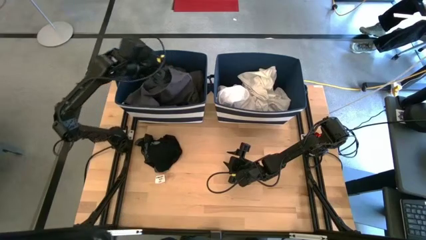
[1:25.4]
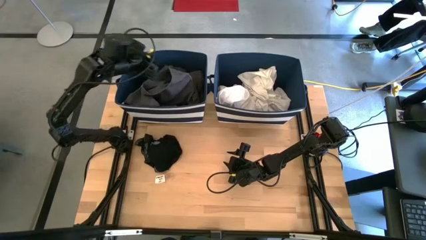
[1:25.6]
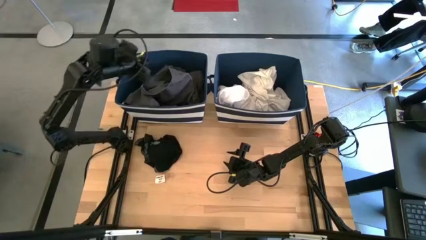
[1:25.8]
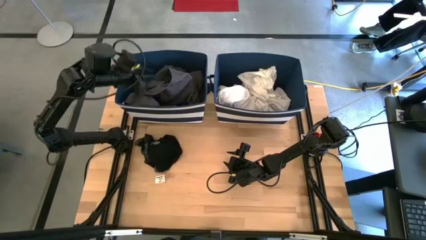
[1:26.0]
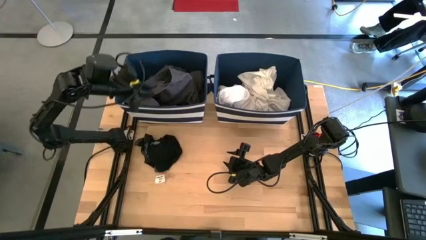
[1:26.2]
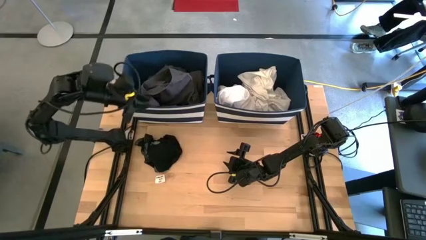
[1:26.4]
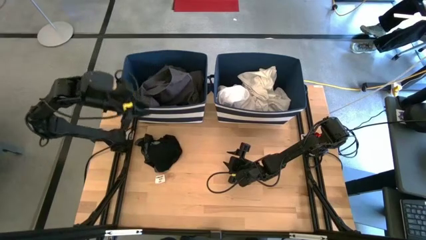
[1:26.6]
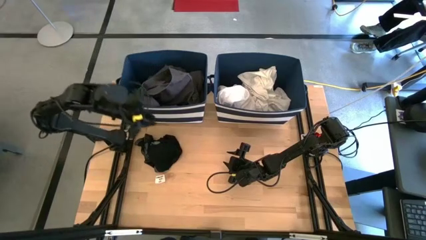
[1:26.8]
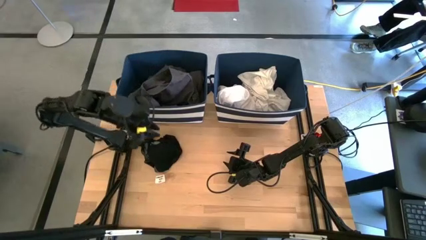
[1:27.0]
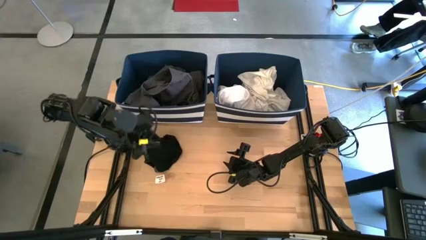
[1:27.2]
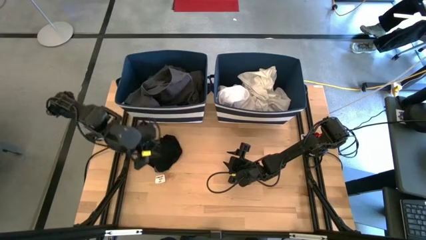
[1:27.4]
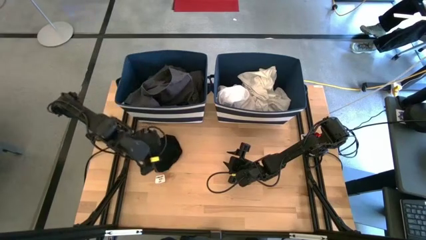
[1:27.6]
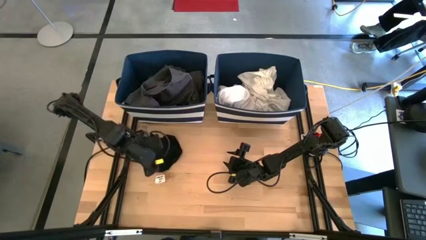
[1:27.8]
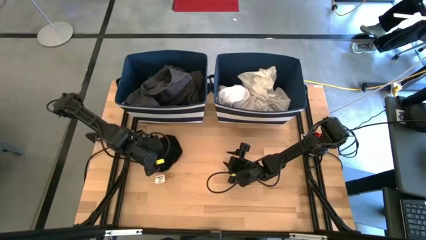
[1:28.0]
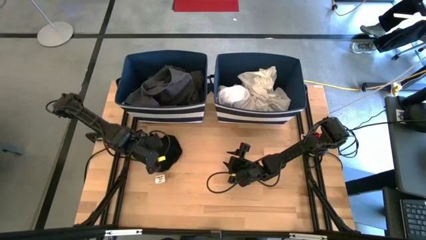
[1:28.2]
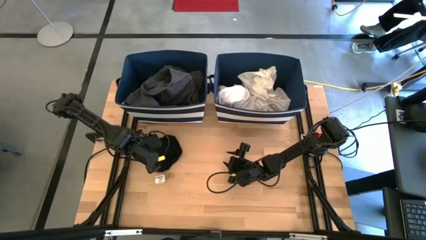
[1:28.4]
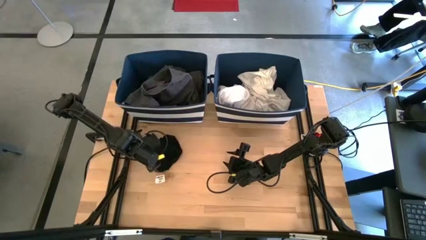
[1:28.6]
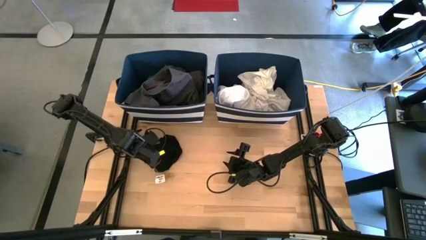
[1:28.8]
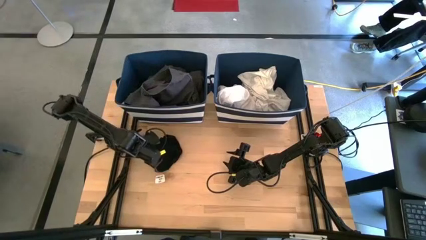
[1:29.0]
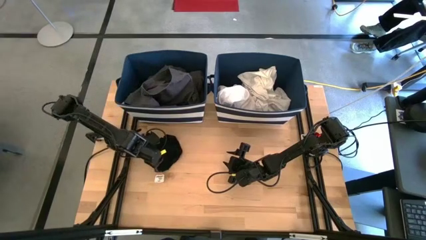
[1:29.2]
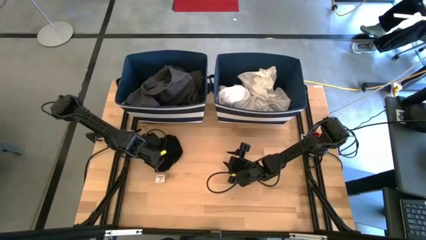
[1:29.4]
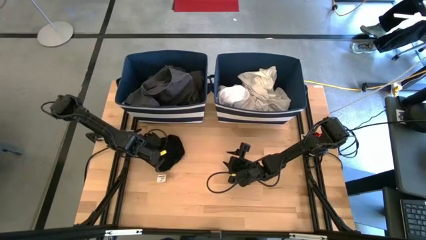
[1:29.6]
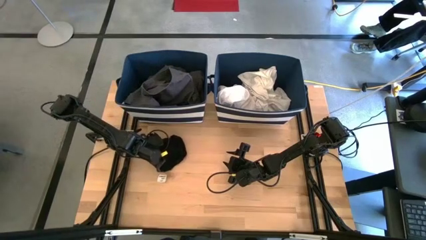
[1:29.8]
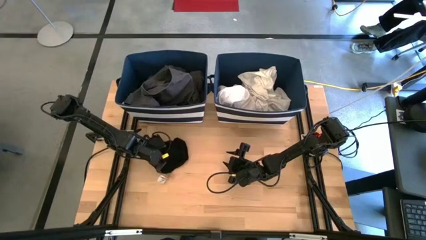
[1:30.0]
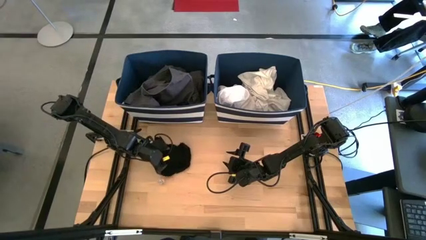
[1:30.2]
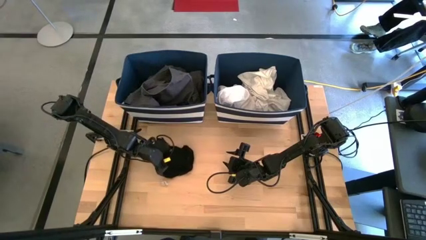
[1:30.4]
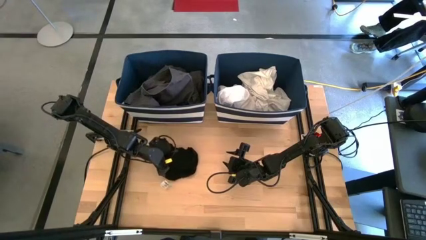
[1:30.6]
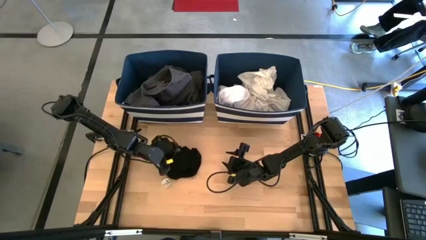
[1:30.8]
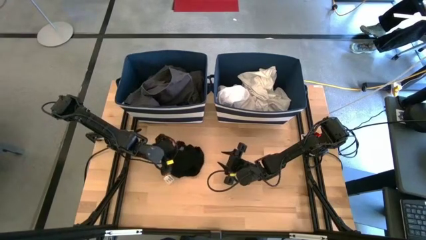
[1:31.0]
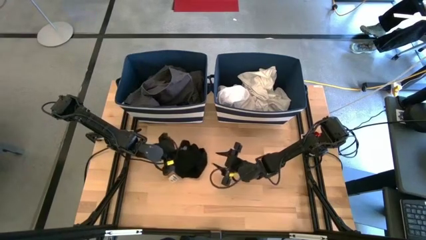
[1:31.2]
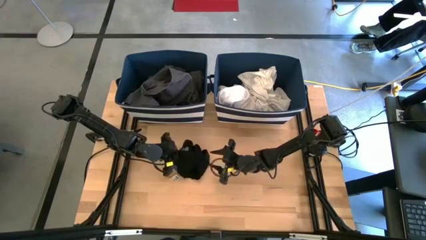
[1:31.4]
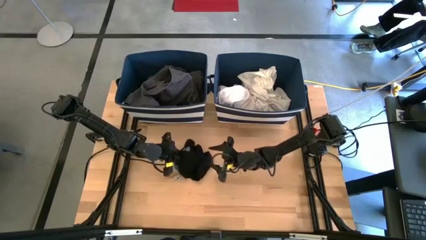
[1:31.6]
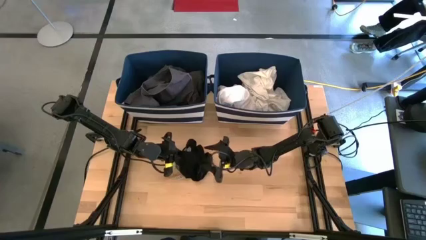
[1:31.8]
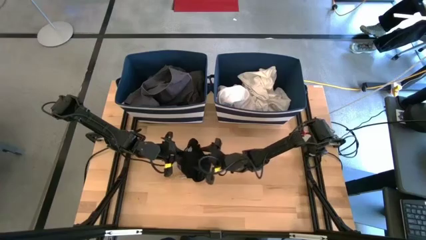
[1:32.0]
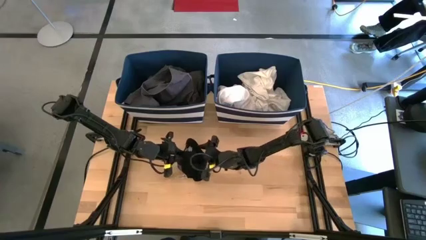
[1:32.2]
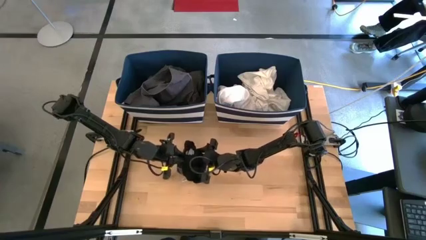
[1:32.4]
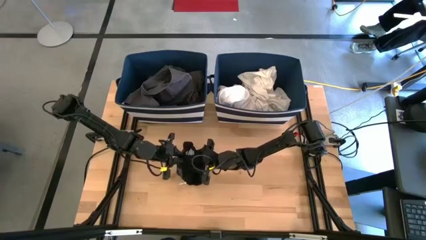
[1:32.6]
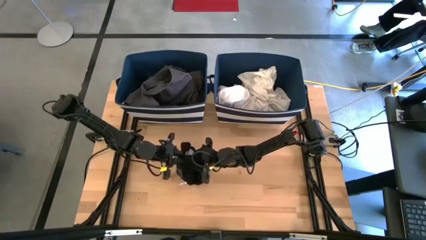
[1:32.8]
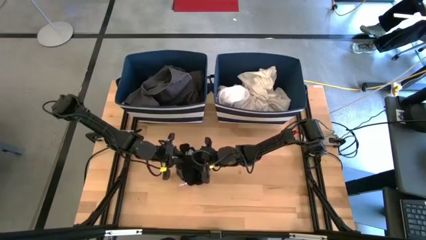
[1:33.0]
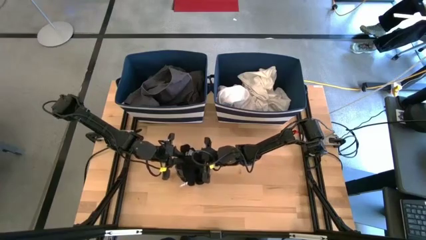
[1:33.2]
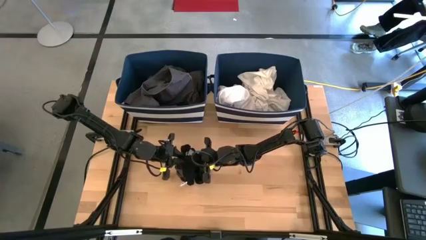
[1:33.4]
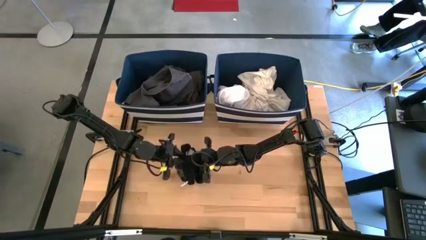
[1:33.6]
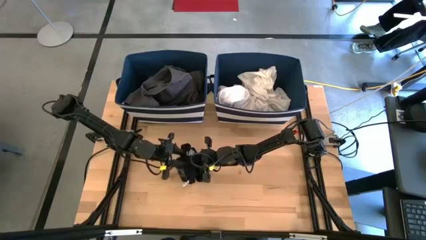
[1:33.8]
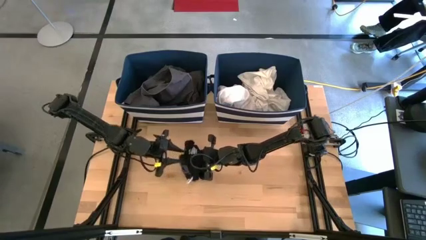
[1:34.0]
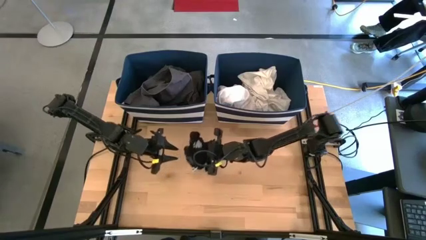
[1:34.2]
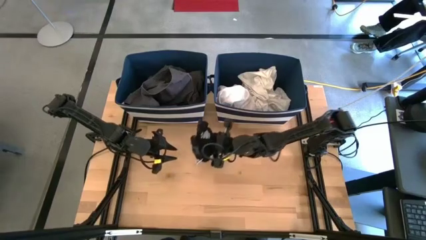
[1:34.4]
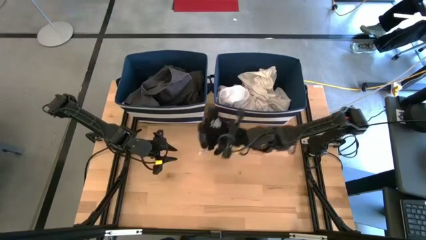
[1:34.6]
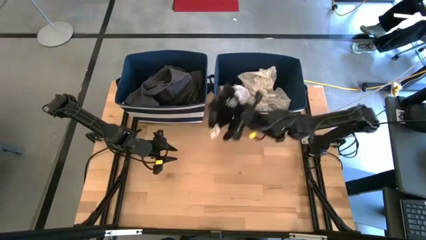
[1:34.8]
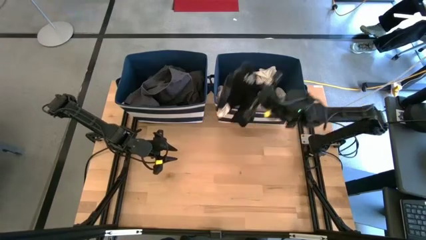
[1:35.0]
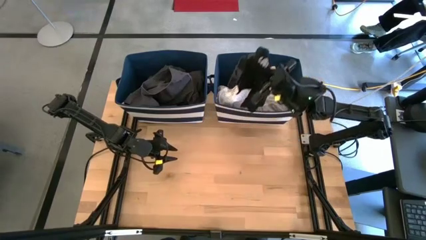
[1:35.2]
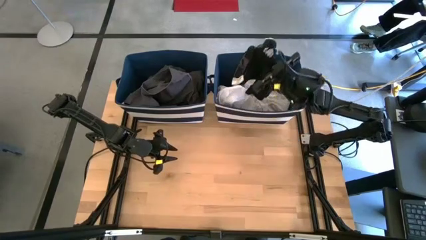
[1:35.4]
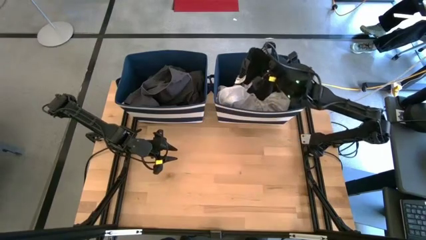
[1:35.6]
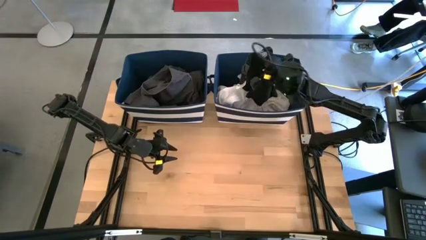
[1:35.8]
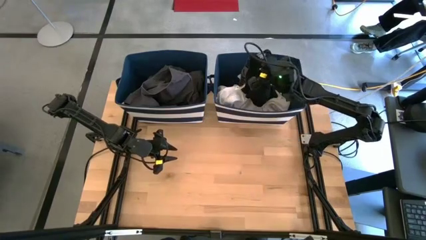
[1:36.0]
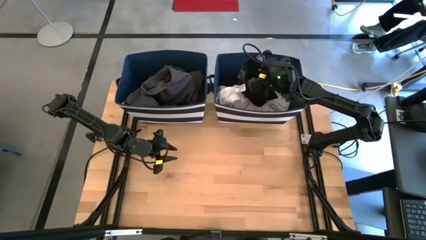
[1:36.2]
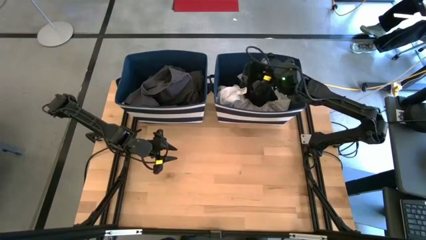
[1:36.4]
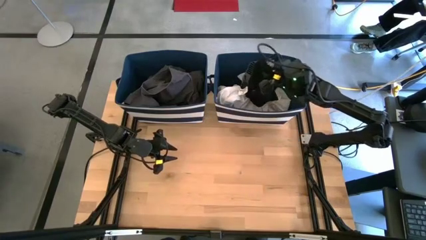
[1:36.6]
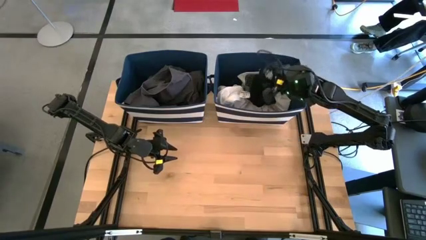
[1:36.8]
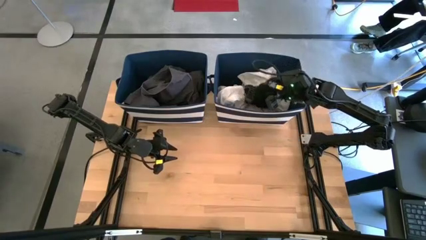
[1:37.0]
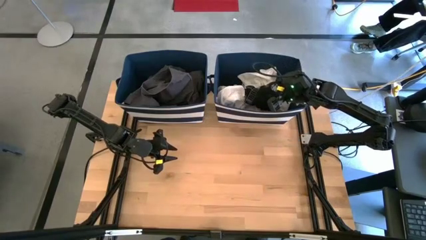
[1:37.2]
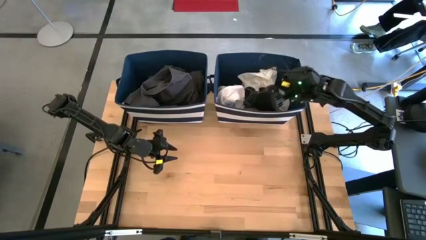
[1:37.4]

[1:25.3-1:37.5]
Task: Sort clothes
Put the black underwear into the right laundry bin
